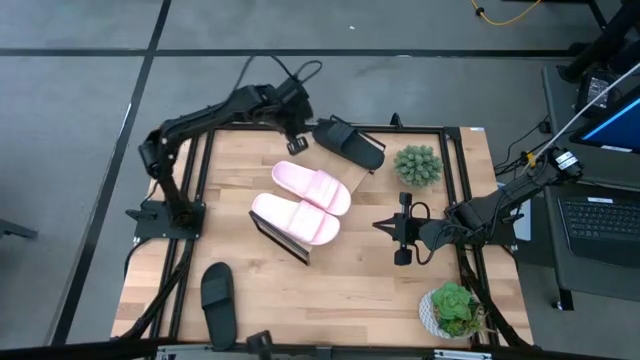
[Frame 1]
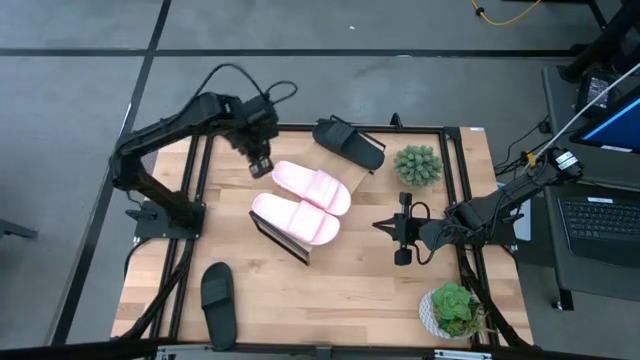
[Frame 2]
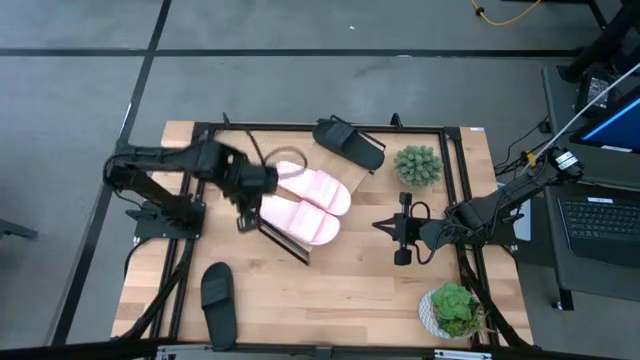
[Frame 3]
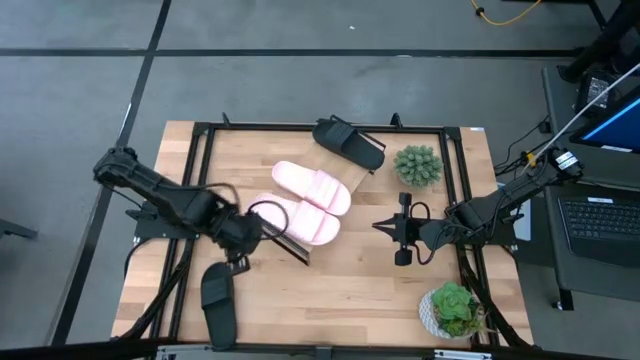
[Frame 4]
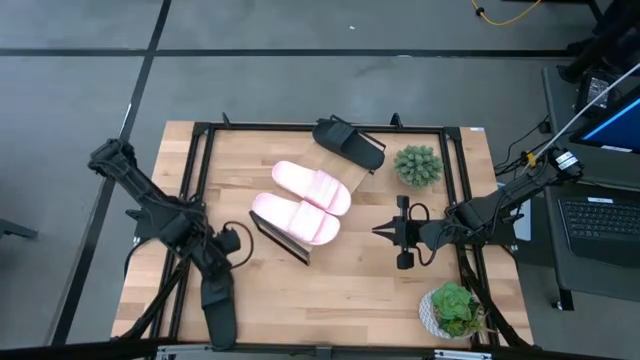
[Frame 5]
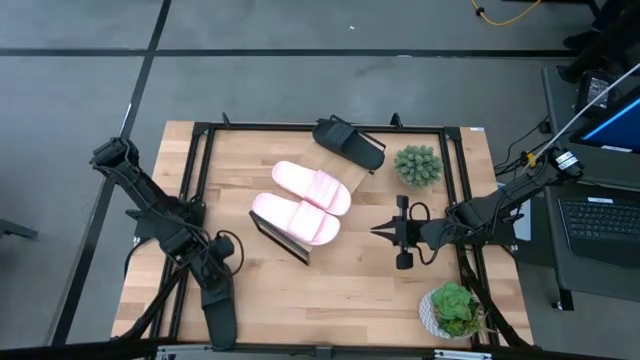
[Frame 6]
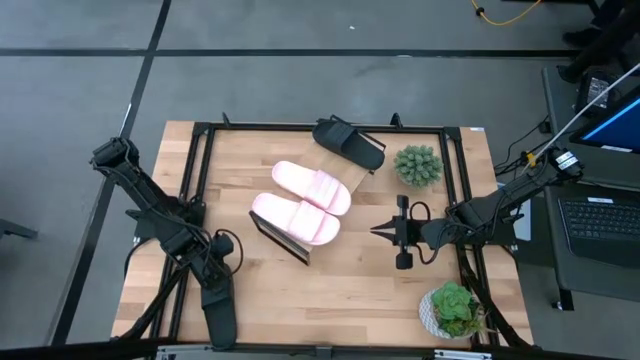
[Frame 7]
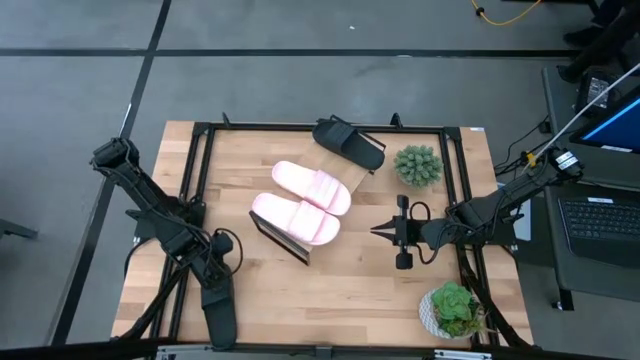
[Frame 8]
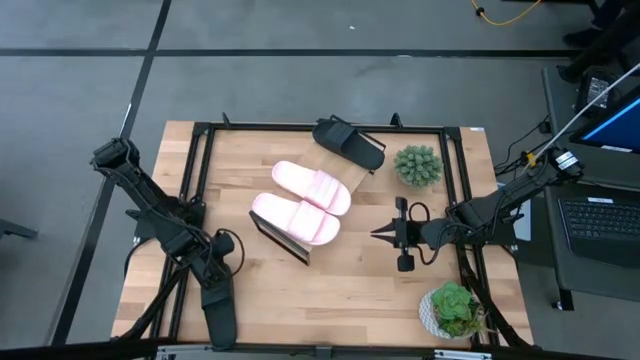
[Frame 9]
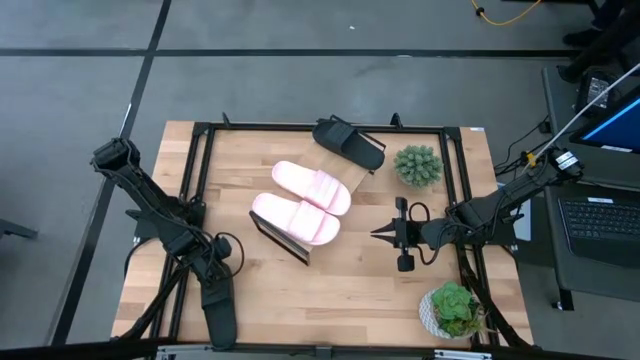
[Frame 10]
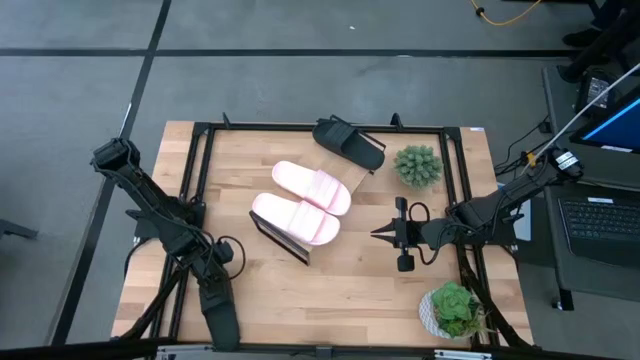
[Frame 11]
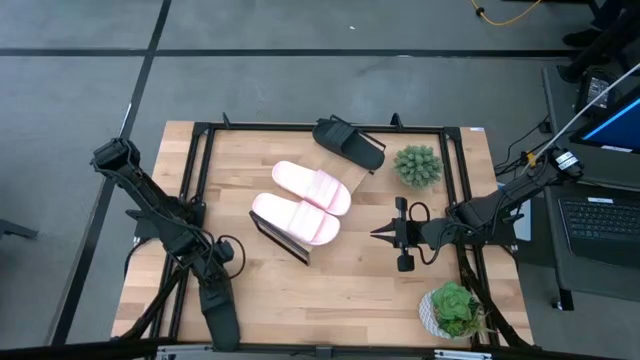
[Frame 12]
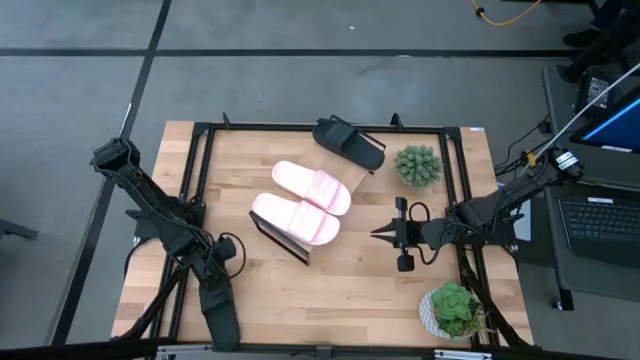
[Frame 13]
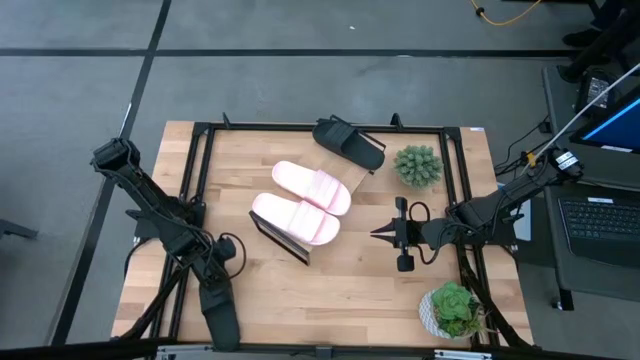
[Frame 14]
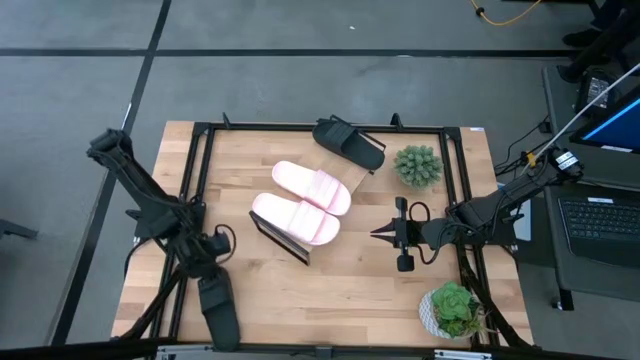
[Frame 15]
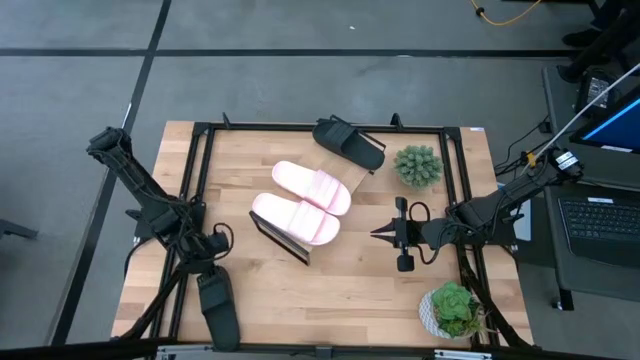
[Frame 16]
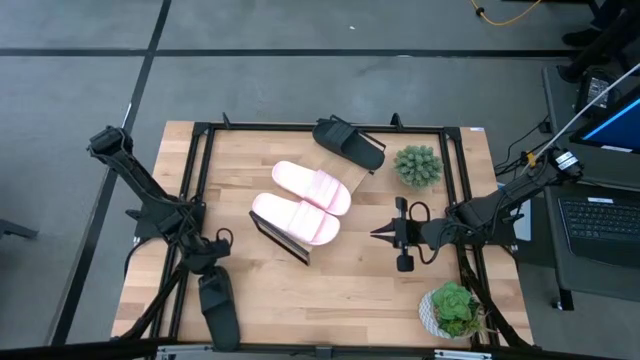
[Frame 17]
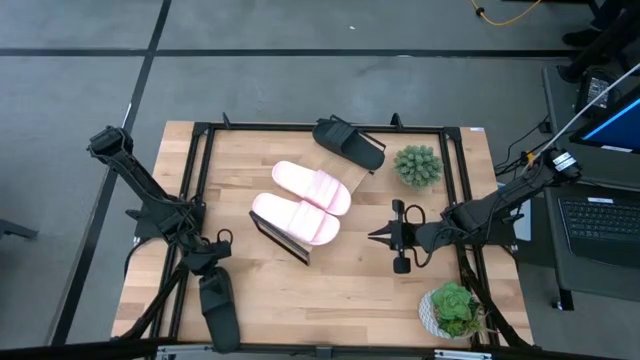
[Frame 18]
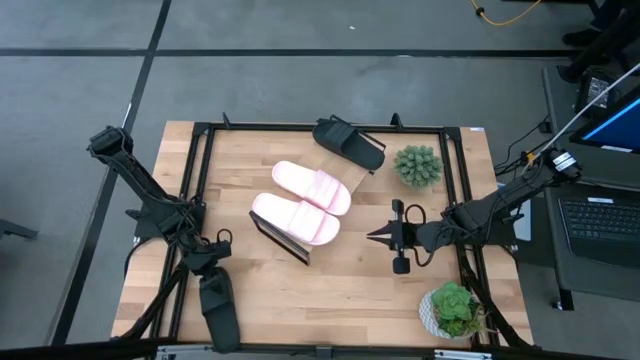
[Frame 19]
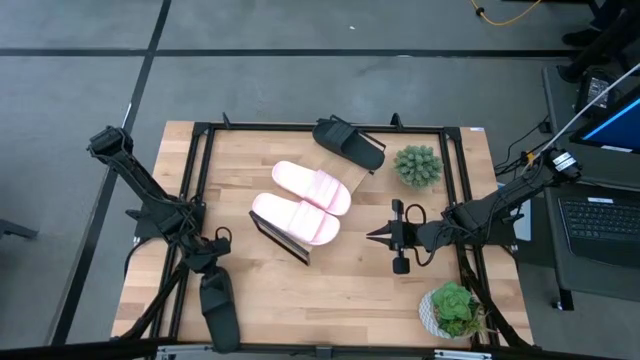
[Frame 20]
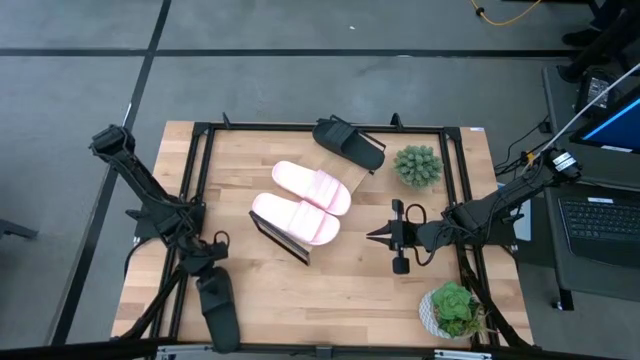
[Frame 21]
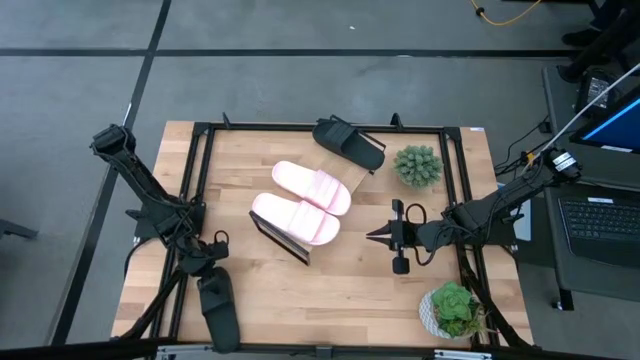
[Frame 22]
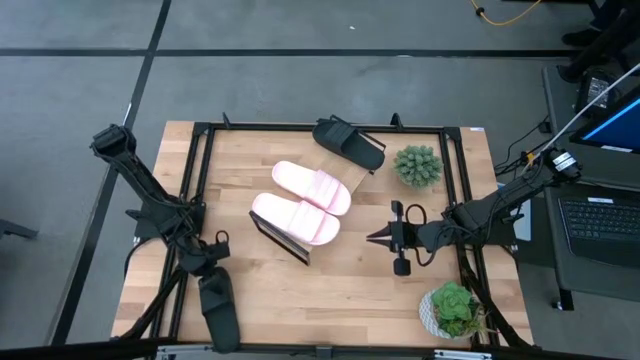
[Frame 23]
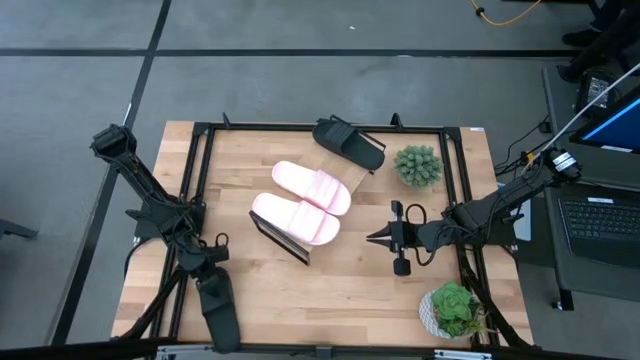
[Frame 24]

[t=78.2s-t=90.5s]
Task: Pick and place slides into the shelf
Put the black slides on the shelf

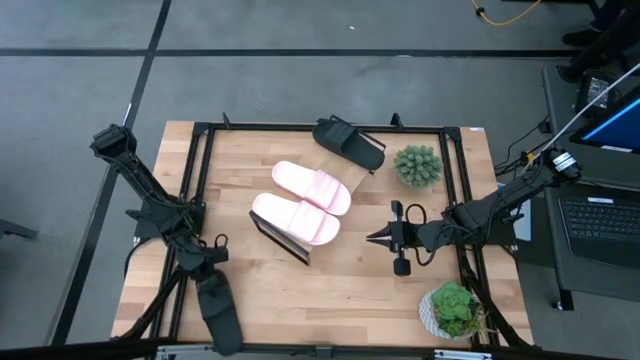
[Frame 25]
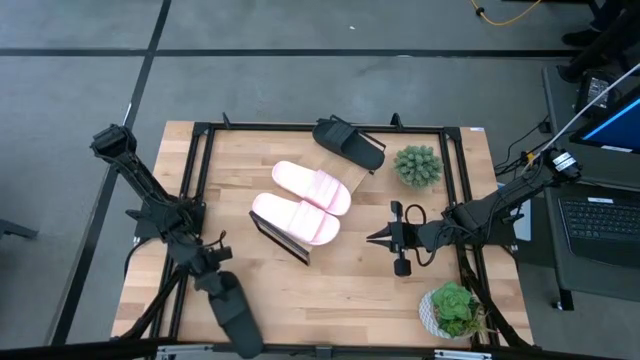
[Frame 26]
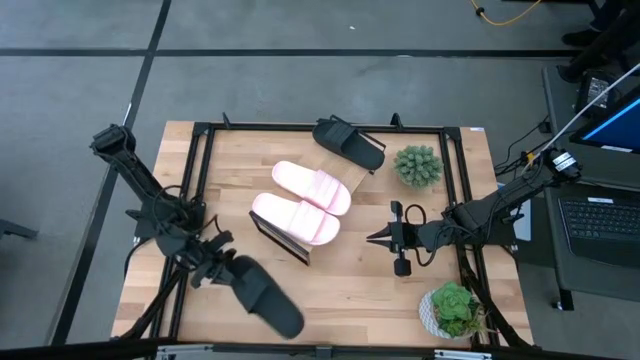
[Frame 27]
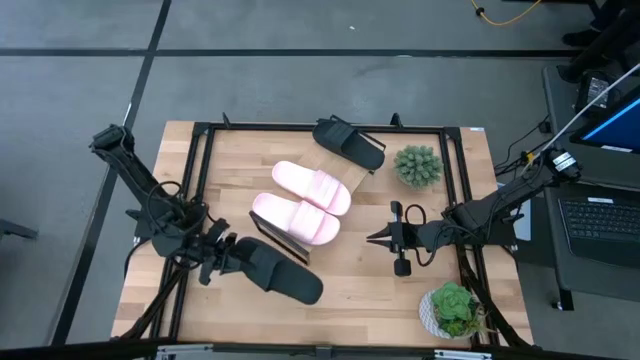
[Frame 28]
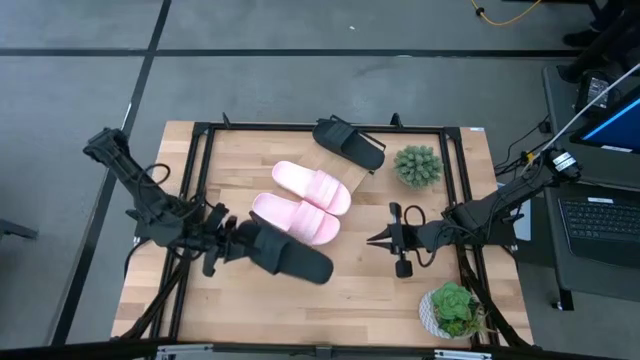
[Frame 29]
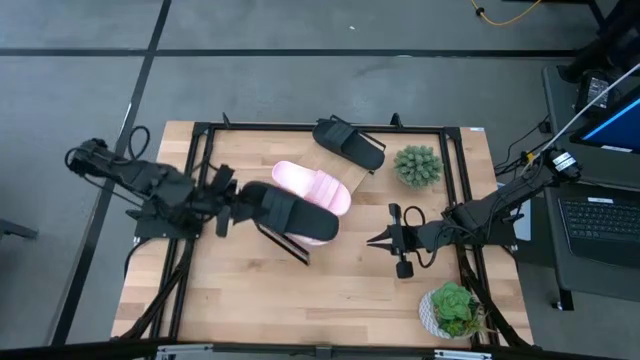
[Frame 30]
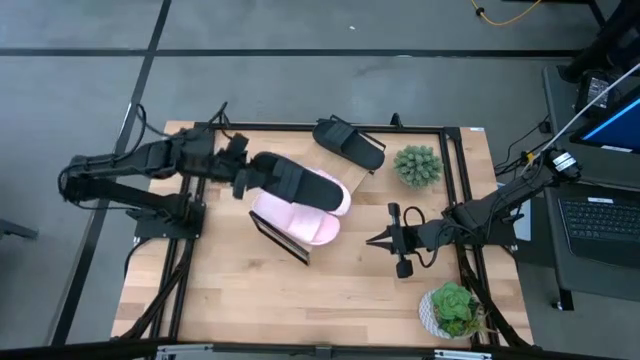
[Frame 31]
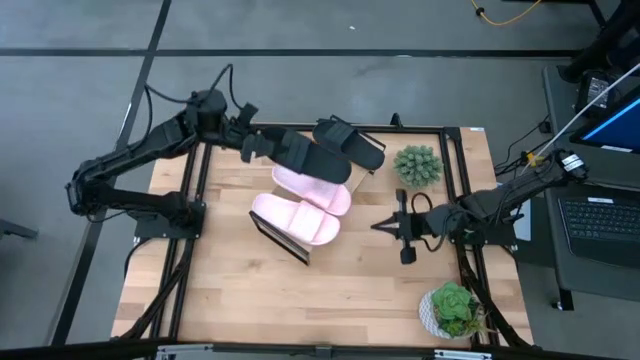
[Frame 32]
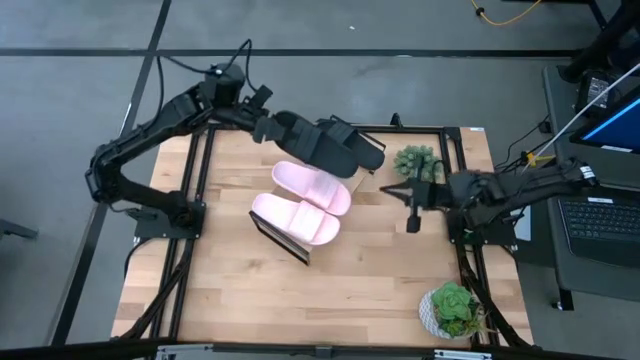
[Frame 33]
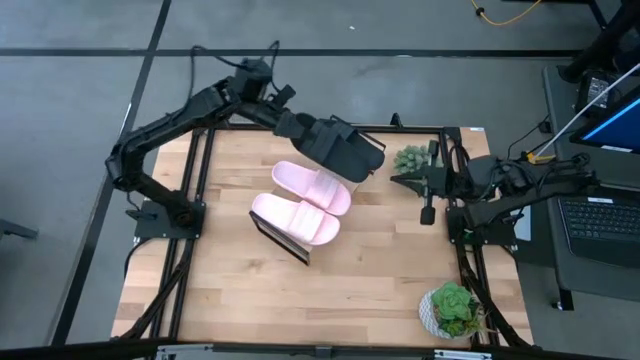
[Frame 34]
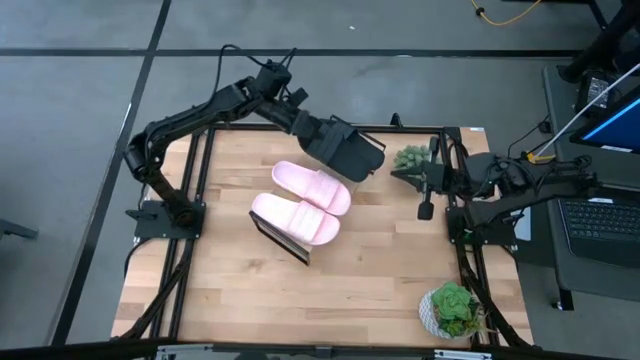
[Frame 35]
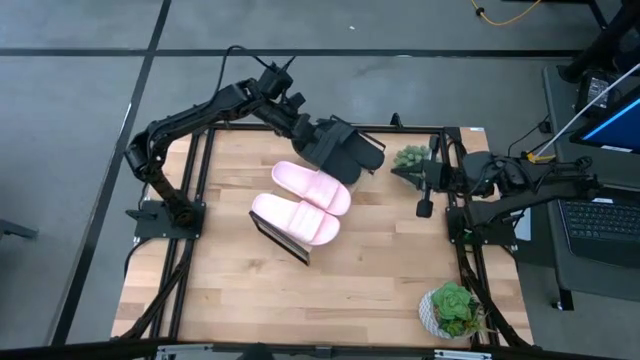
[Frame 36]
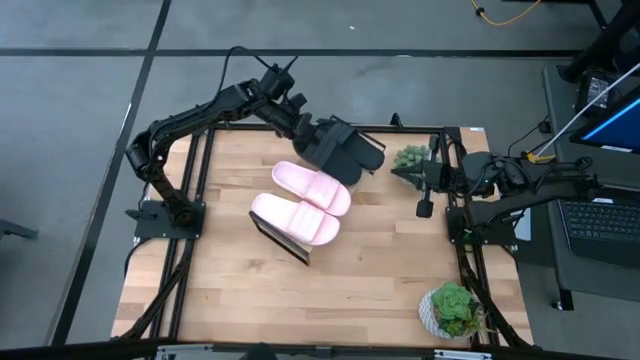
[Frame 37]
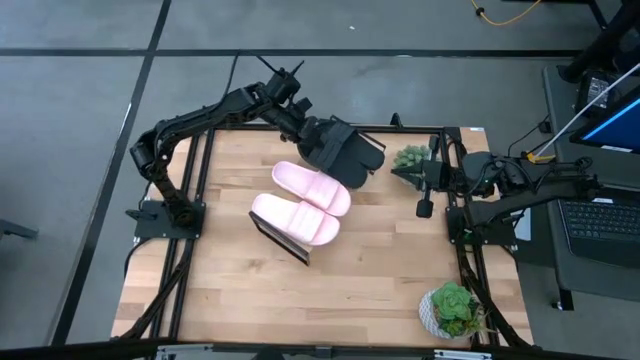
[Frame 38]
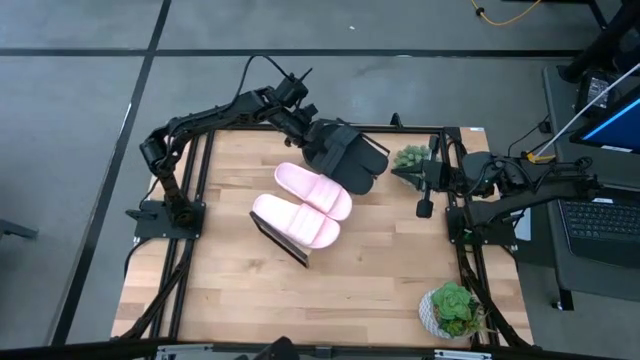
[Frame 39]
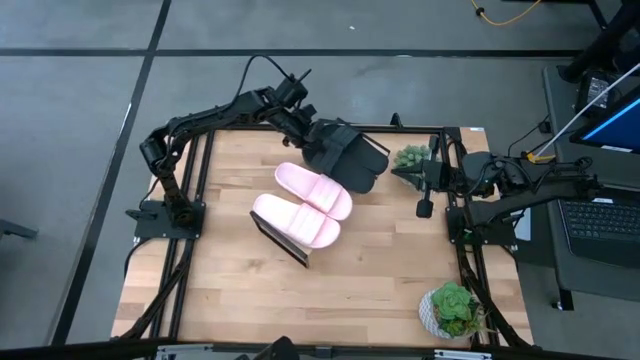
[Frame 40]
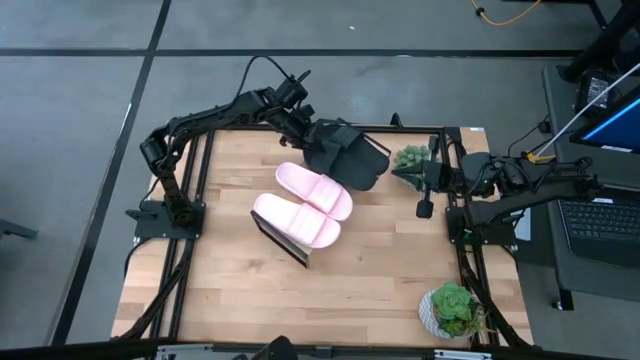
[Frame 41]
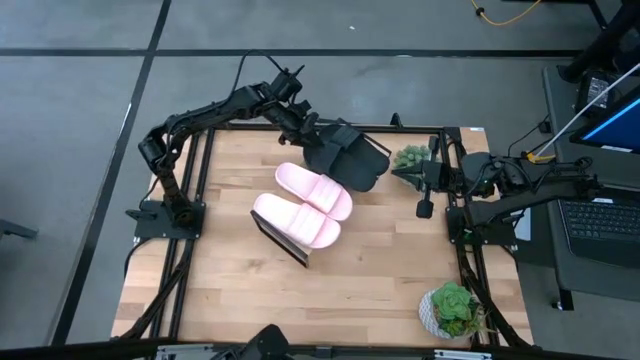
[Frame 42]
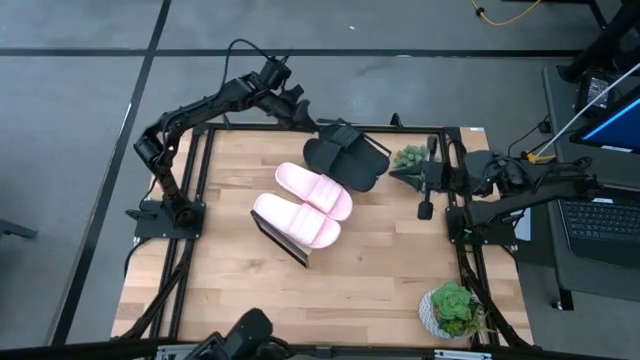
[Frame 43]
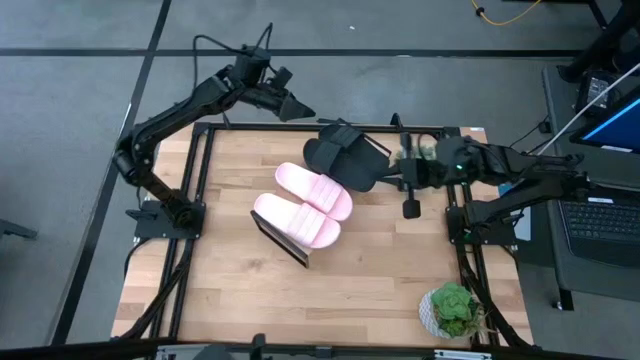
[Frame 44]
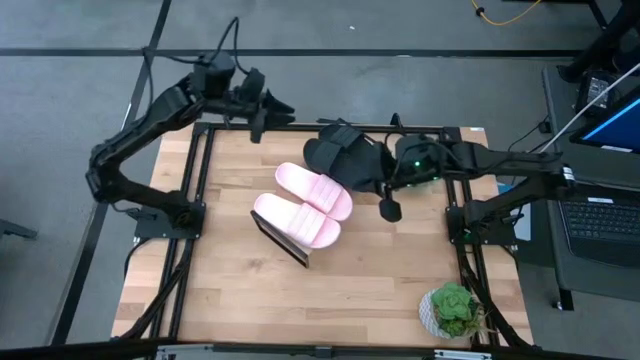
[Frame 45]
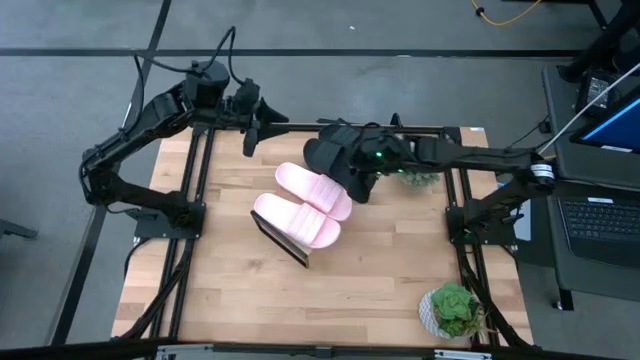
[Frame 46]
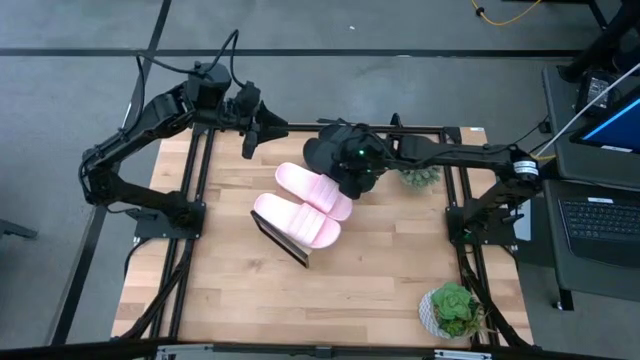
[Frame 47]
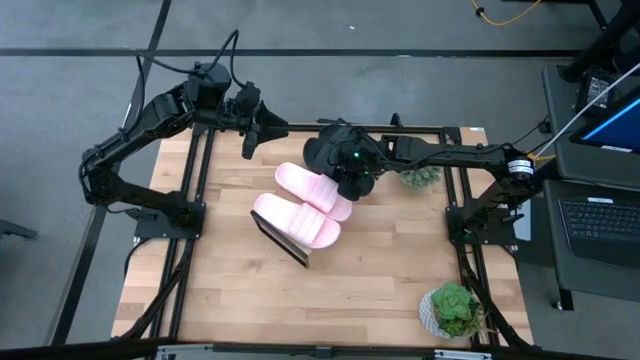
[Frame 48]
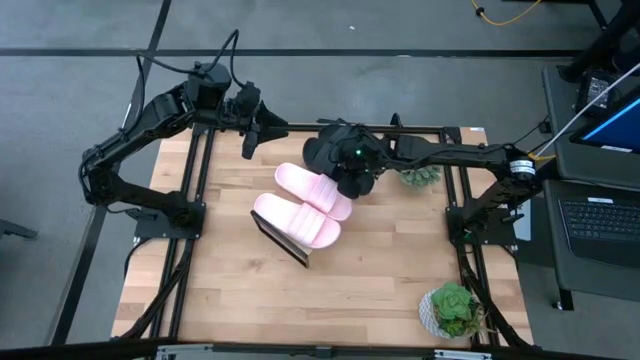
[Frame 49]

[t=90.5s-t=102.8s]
Put the black slides on the shelf
